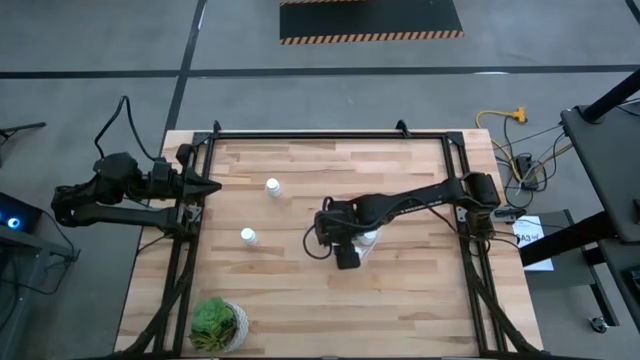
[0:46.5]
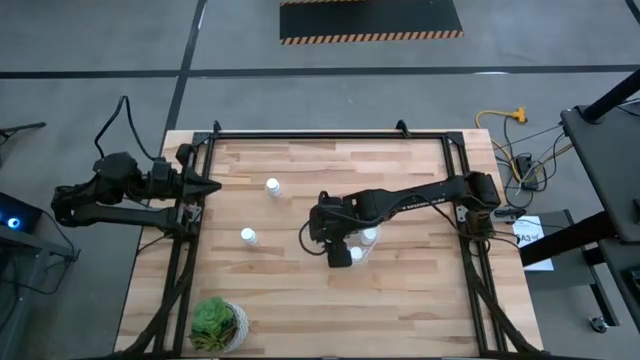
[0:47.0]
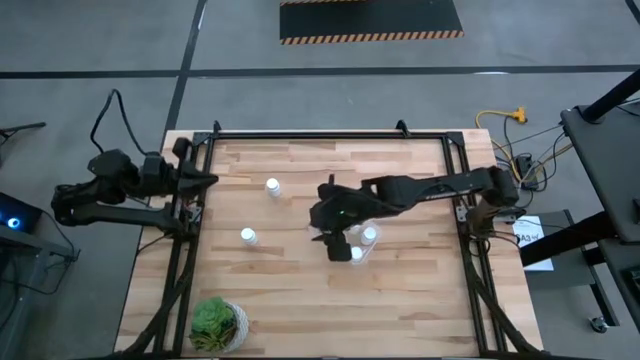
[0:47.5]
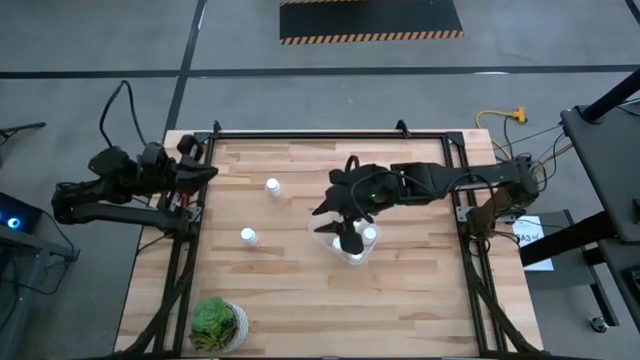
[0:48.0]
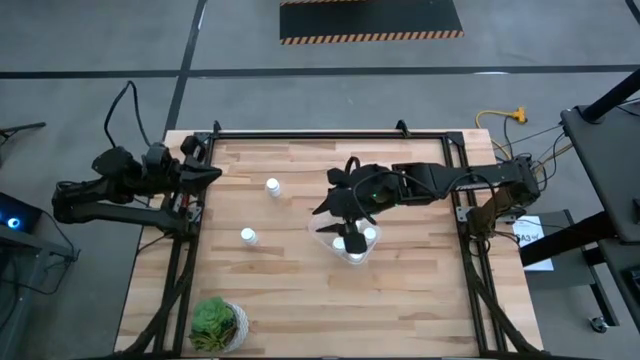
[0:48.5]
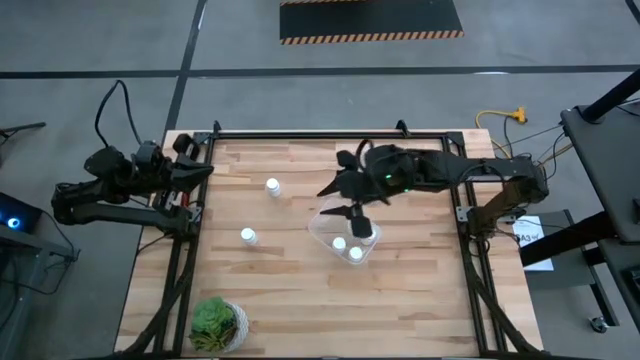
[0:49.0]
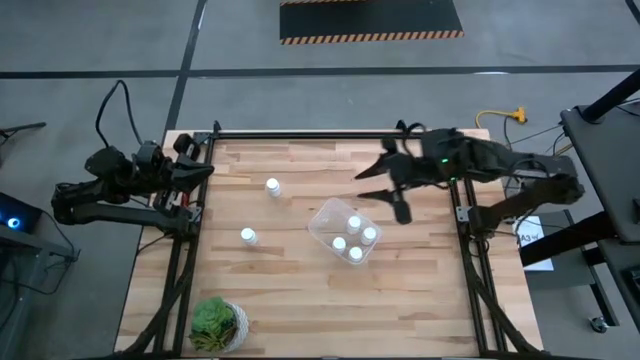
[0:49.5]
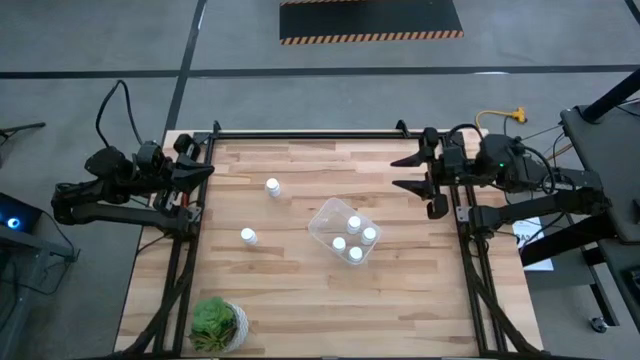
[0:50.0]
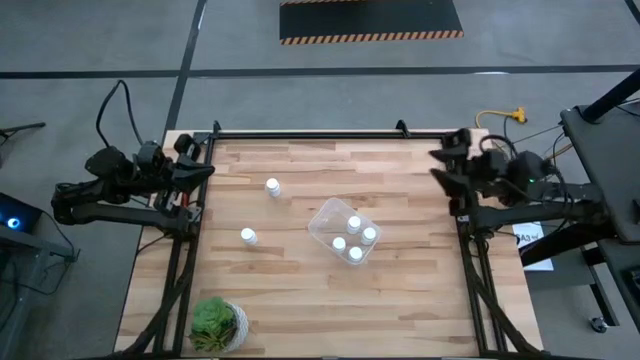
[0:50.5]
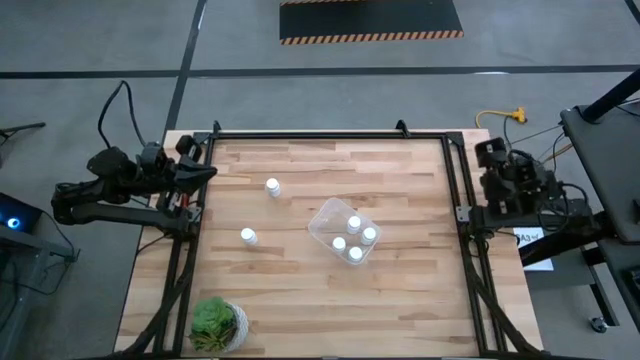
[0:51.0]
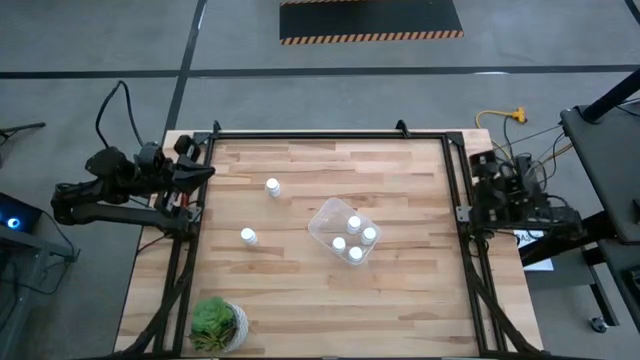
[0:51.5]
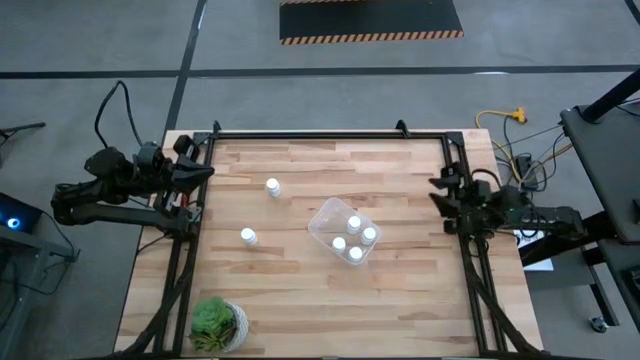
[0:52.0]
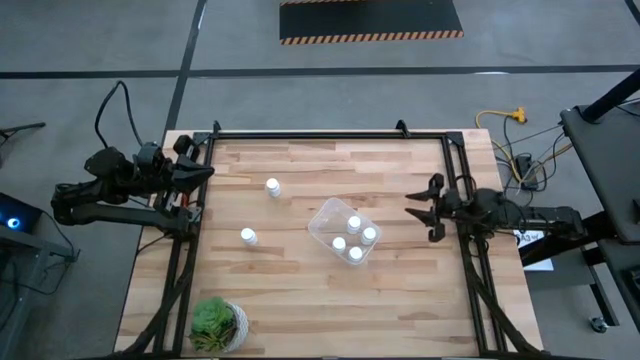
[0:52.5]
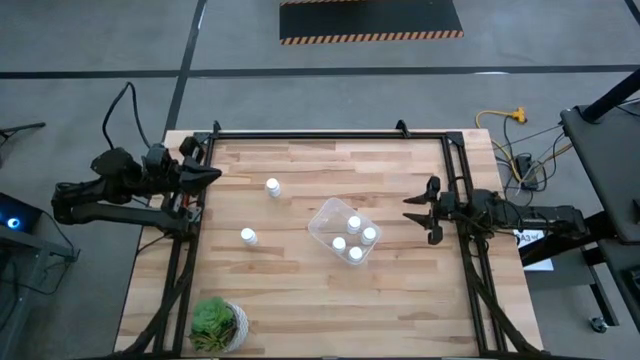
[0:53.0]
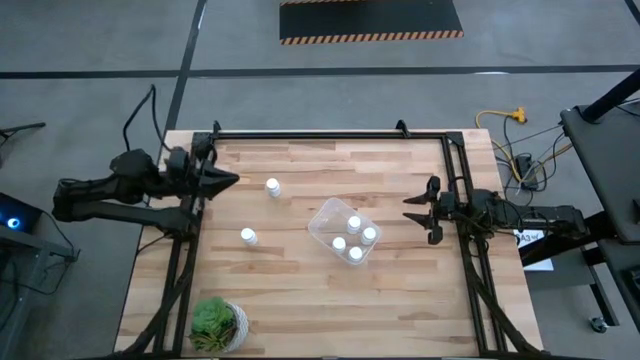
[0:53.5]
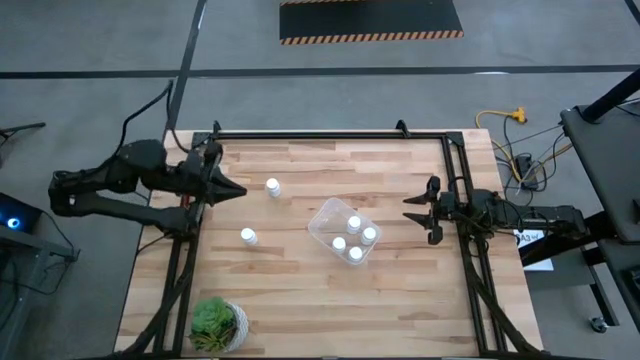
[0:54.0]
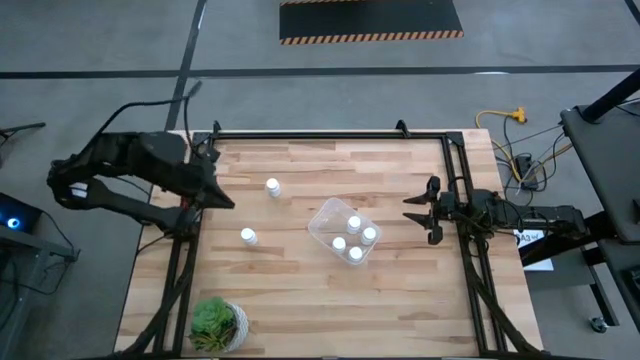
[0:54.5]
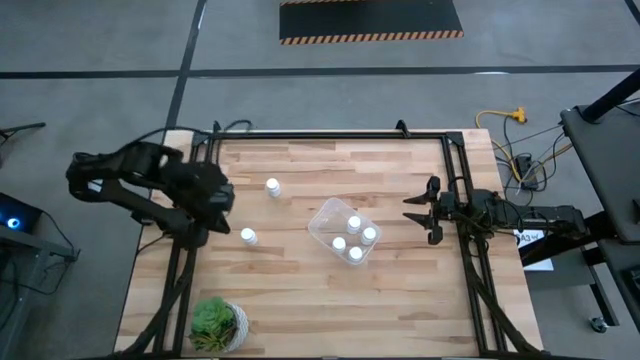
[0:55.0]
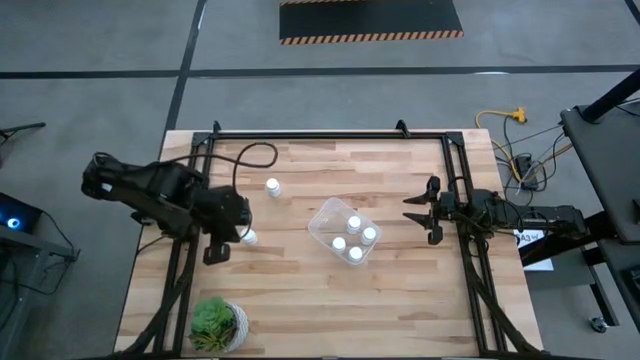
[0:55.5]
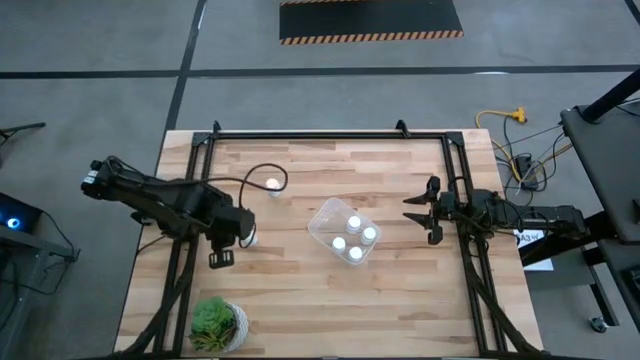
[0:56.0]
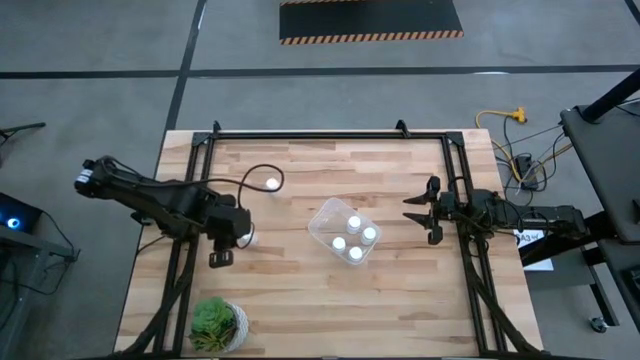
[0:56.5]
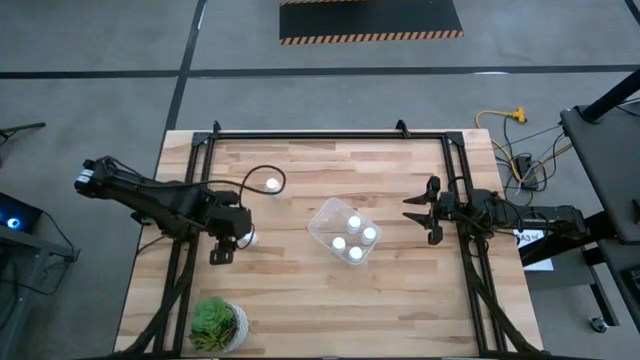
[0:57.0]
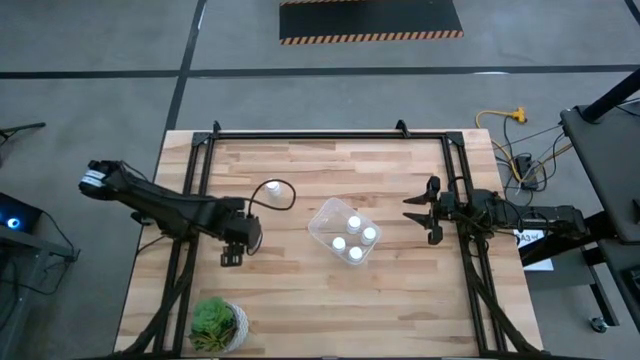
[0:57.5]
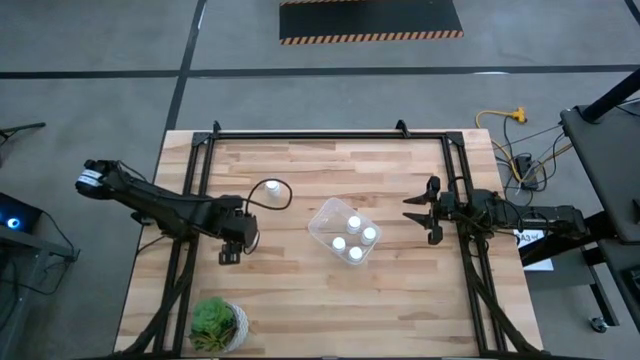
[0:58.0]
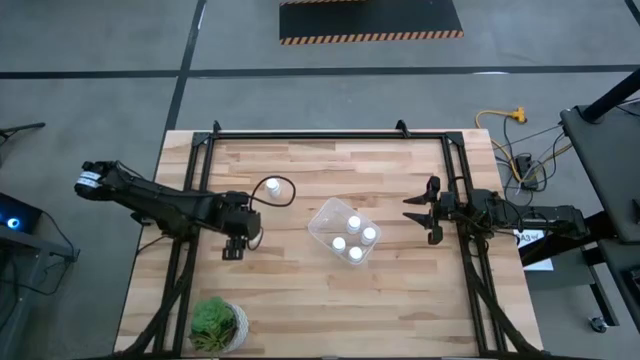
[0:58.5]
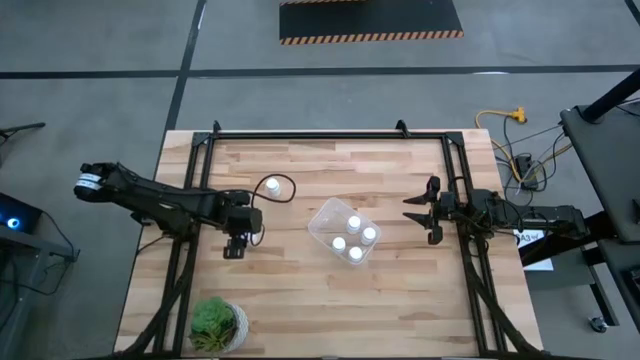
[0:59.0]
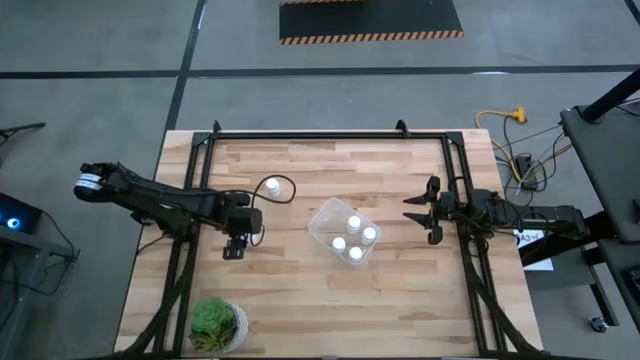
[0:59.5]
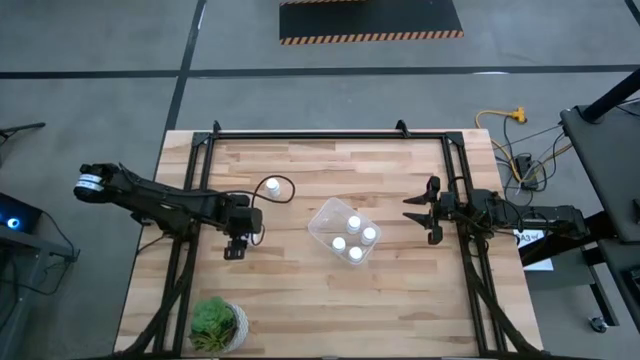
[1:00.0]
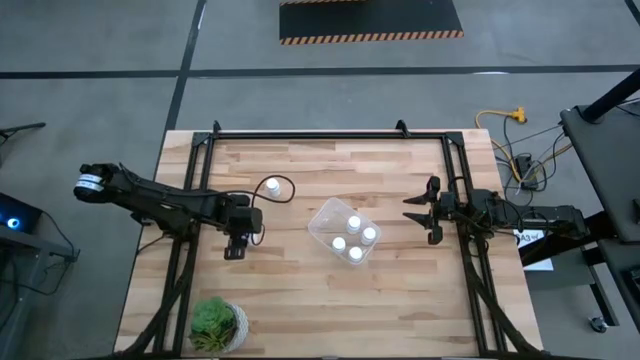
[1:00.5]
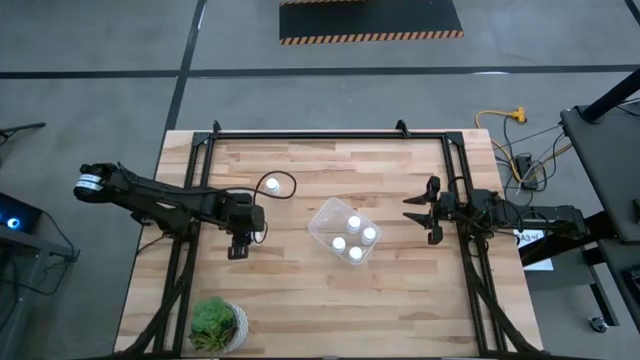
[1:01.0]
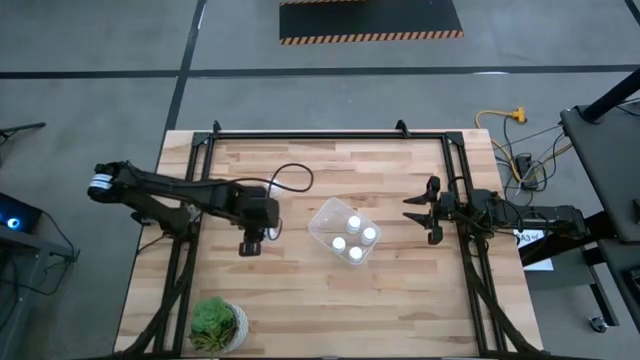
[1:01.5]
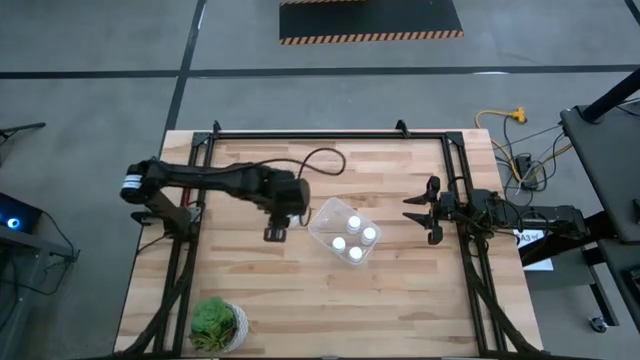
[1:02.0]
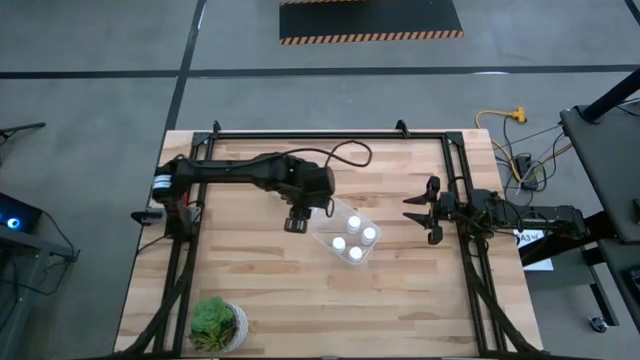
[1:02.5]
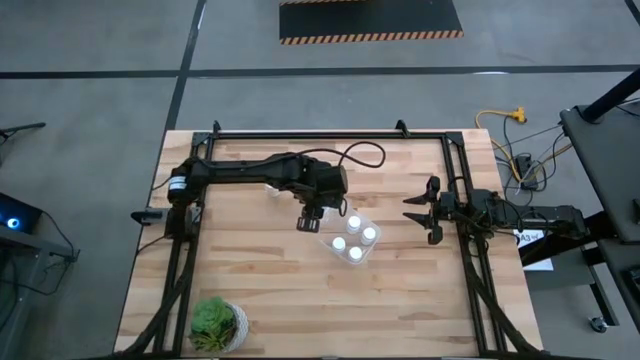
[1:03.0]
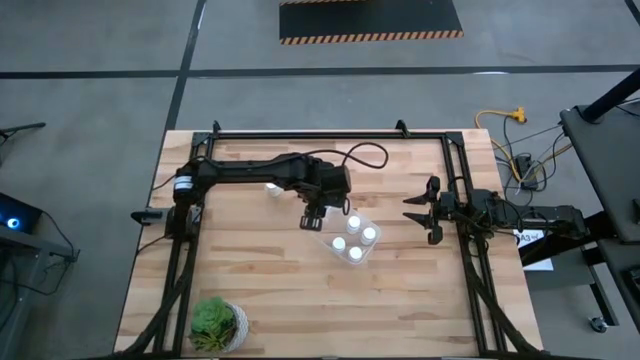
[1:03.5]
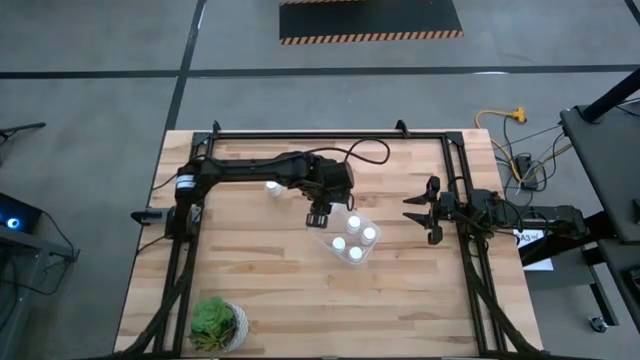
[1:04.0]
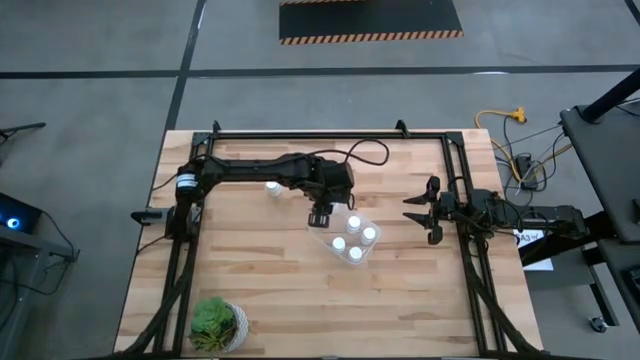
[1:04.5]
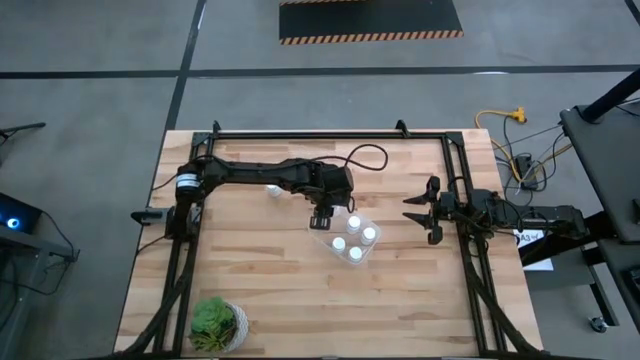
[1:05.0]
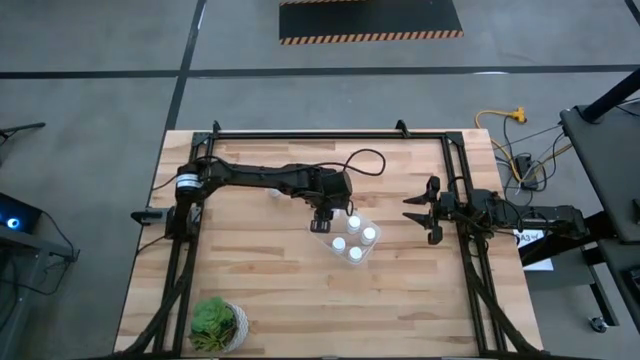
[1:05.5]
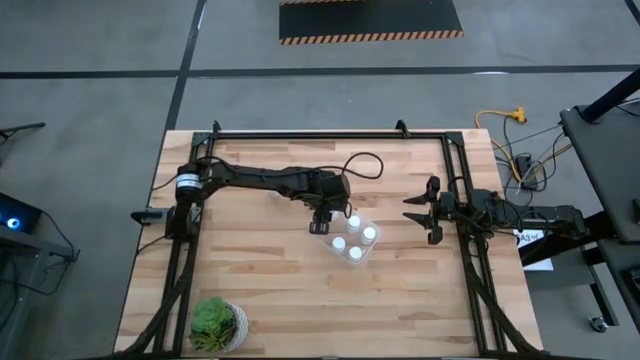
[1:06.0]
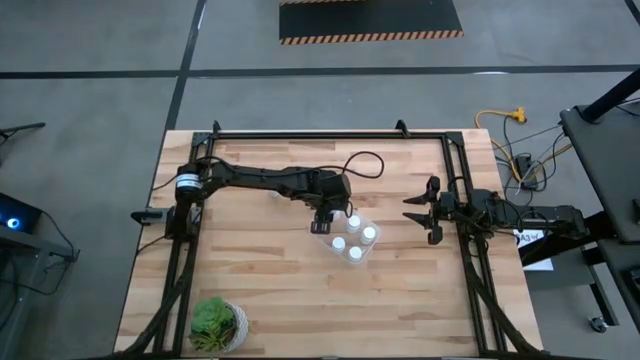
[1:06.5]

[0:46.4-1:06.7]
Task: Pick and place pill bottles into a basket
Put the white pill bottle into the transparent bin
